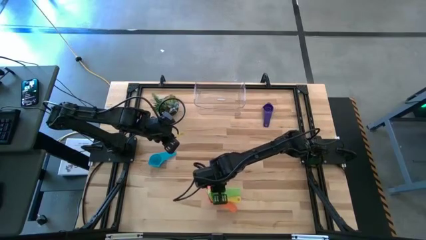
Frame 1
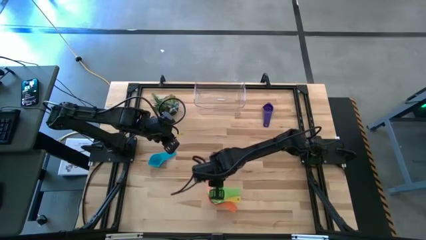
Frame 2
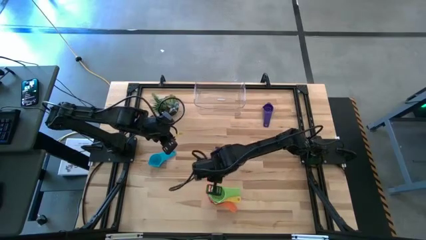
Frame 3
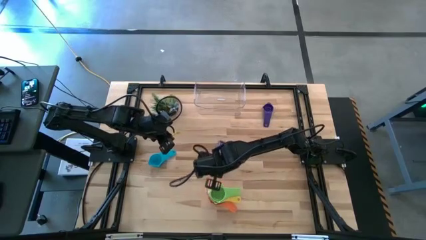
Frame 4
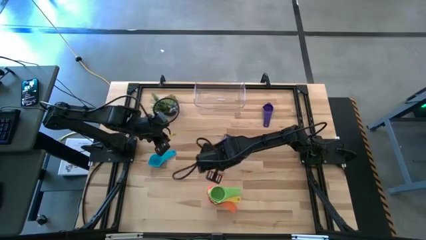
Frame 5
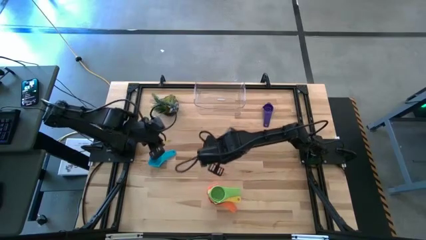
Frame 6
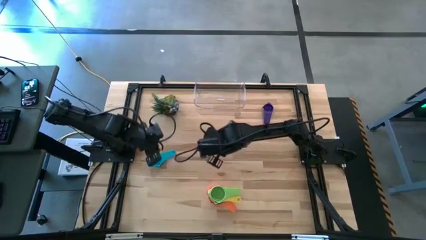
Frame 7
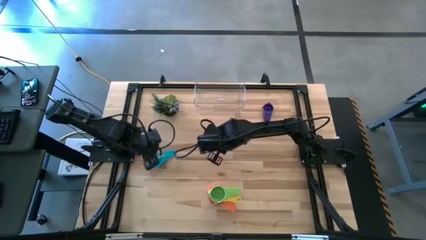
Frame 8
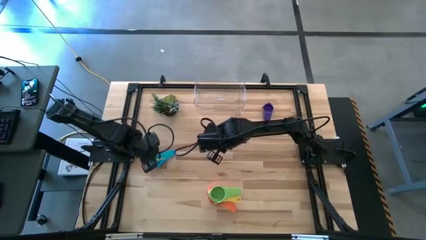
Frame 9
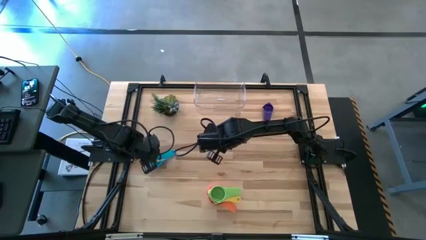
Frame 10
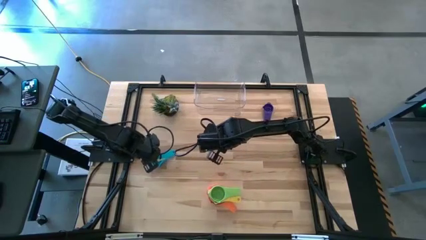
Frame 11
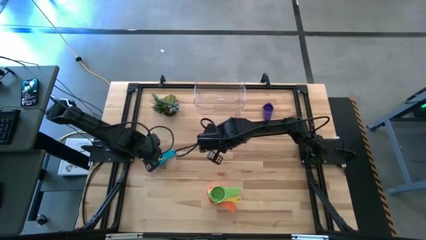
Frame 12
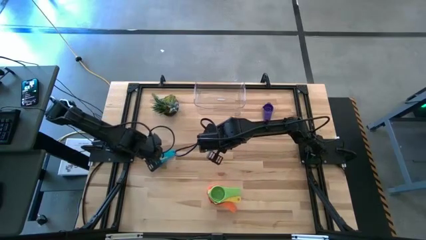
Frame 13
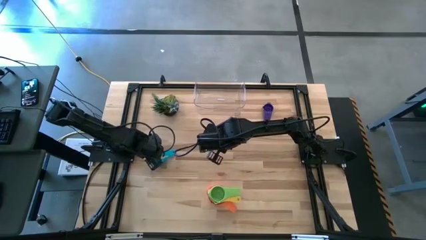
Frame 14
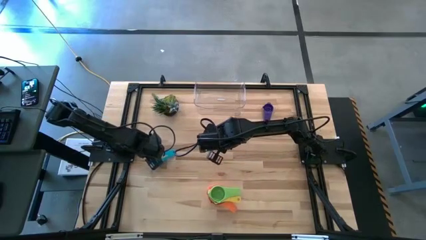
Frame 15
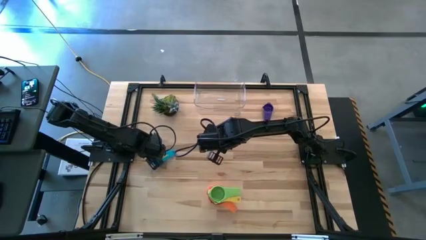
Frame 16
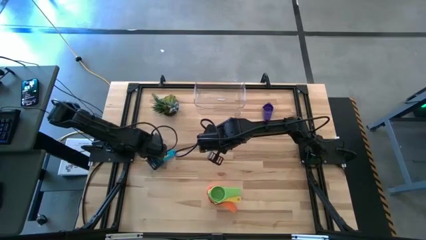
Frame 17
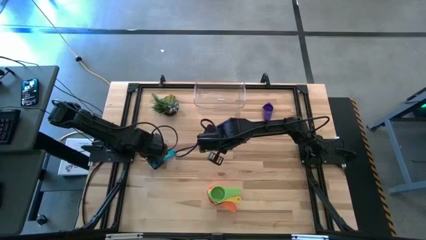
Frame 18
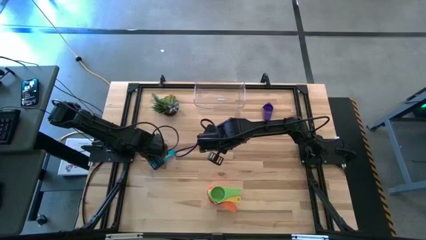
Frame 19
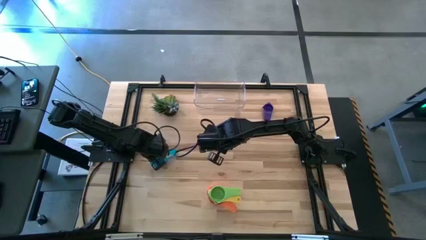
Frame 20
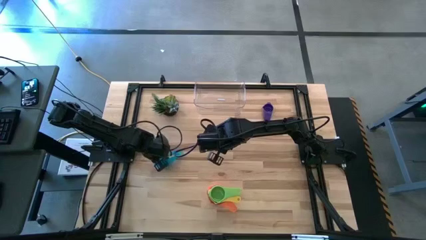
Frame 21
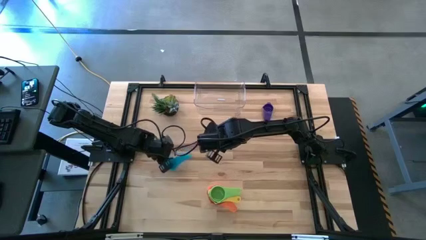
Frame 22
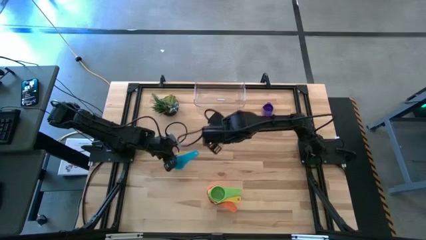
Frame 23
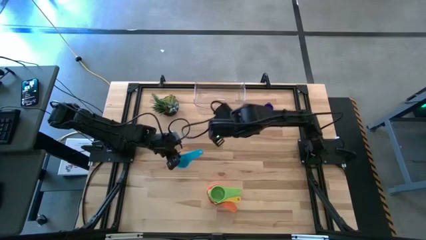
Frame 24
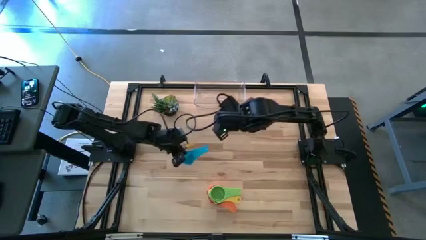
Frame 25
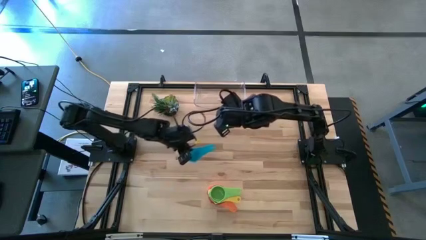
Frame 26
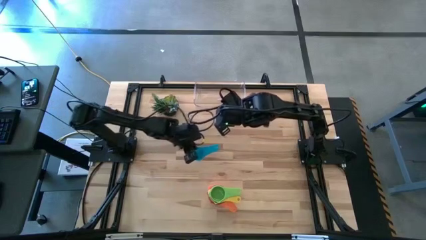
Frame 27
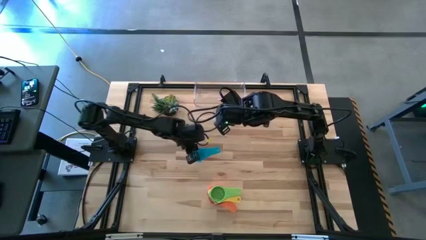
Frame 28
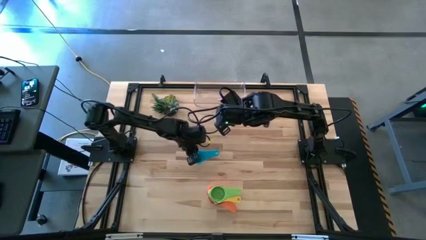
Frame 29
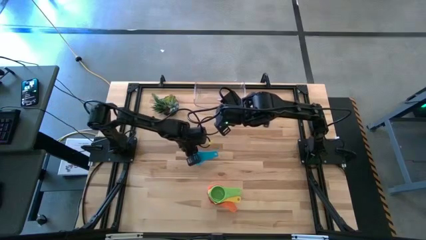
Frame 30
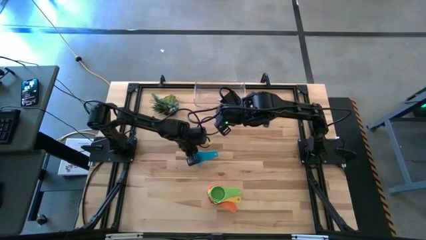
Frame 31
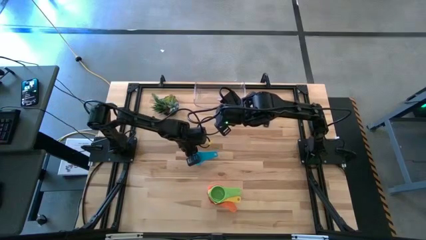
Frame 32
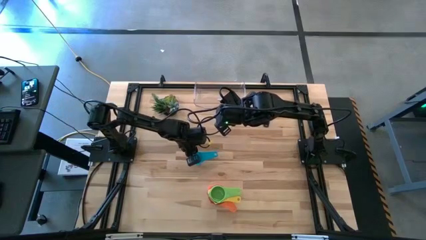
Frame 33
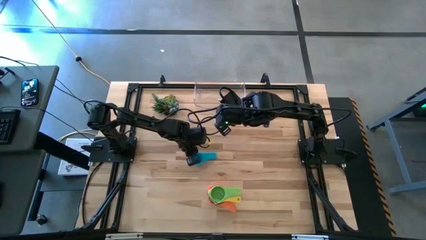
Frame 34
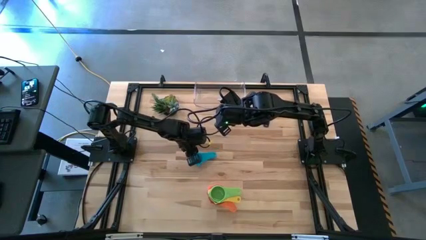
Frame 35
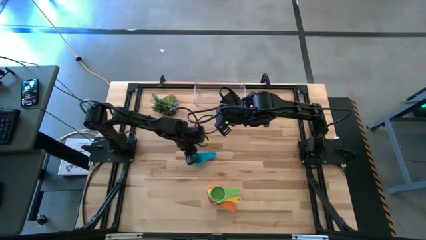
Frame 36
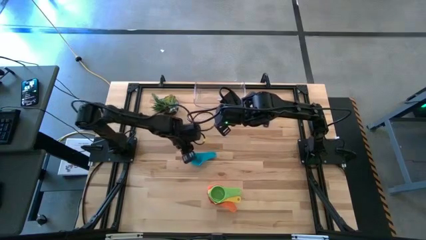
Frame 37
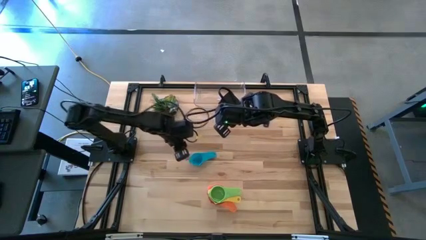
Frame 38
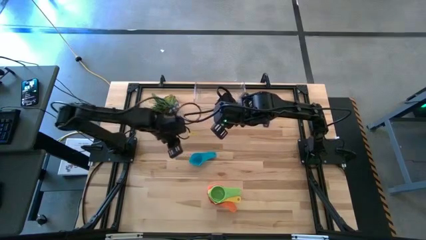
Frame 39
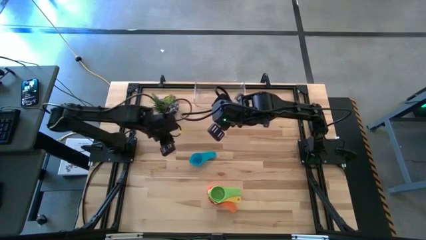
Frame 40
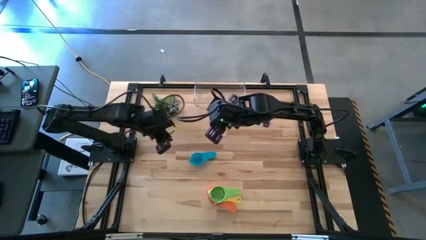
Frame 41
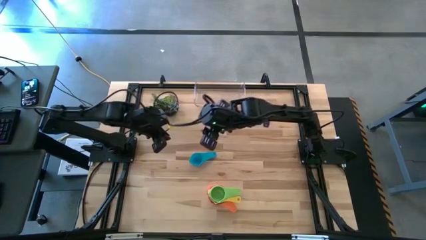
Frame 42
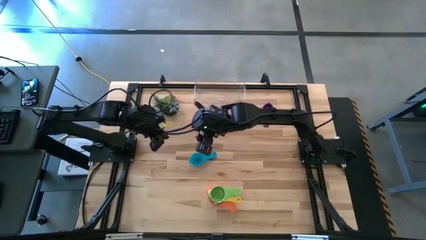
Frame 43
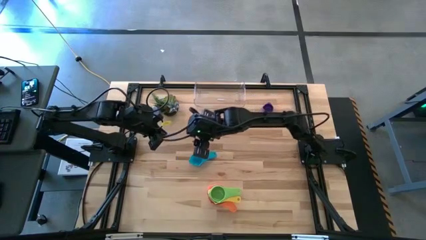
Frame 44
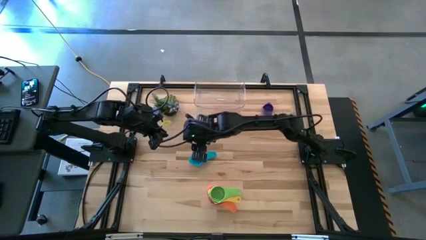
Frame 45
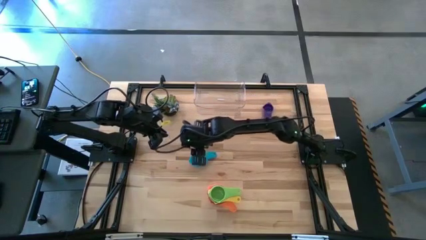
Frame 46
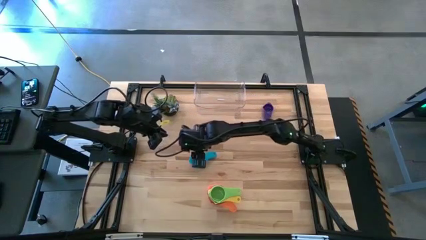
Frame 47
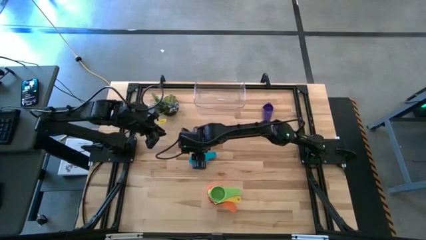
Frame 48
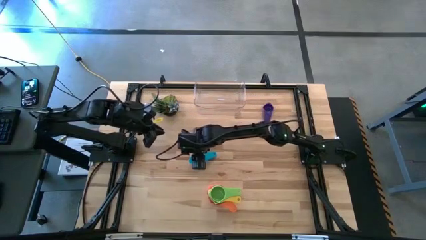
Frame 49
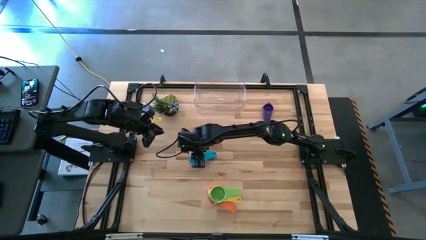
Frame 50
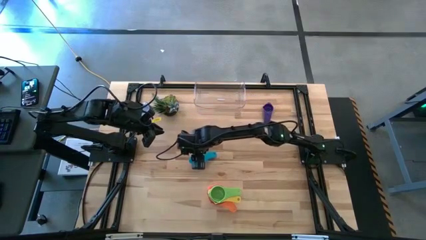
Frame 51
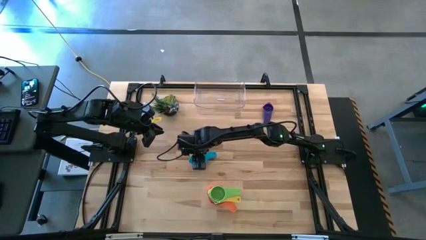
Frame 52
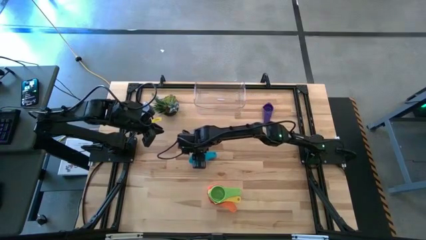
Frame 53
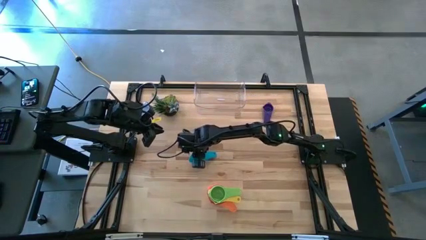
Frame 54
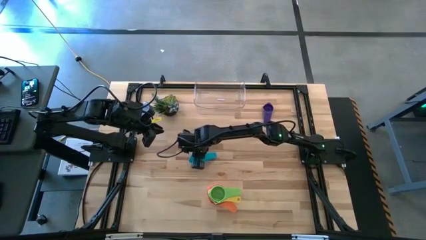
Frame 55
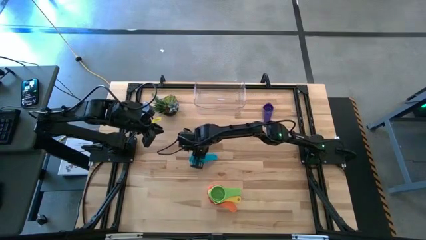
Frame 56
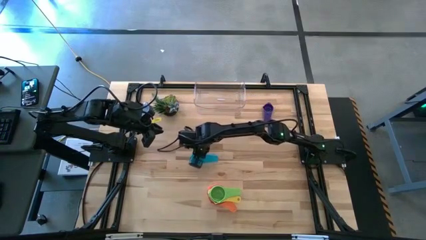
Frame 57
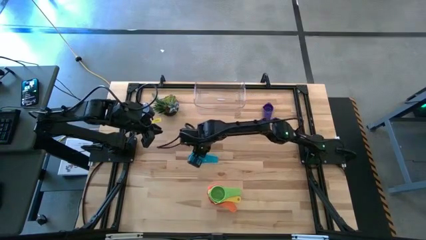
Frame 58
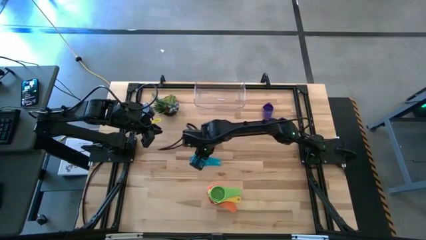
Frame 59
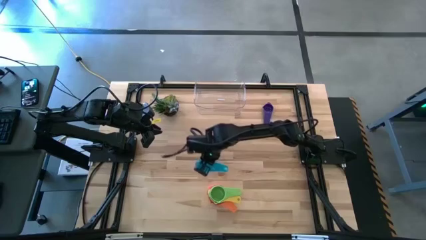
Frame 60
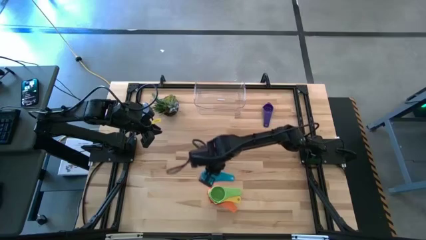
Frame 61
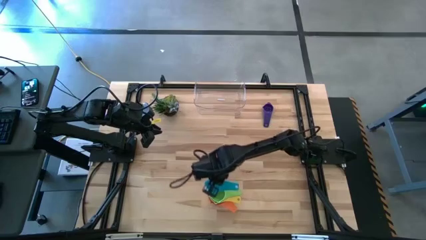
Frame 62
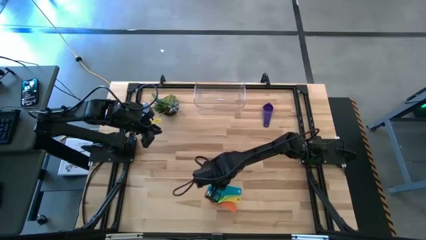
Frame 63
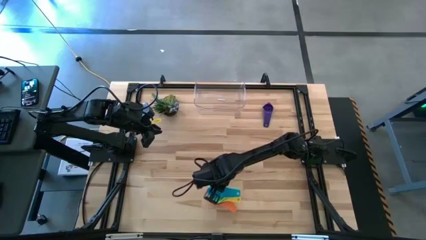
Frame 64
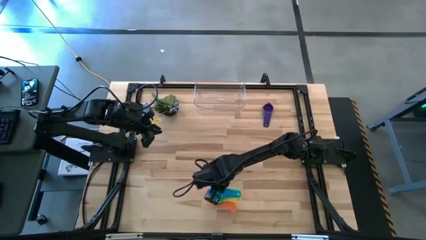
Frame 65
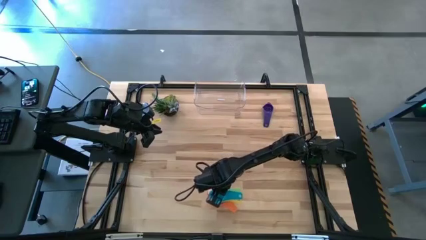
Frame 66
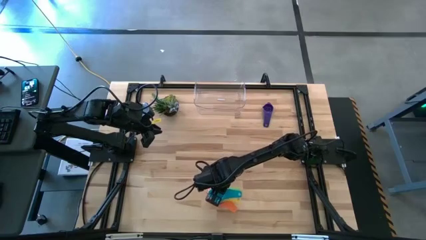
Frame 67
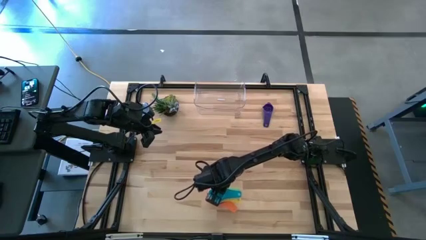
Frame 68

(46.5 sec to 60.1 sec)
Task: Nest measuring cups in basket
Stack the light blue measuring cup on the green measuring cup
